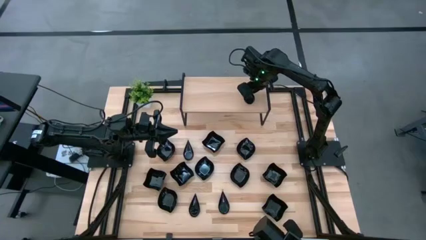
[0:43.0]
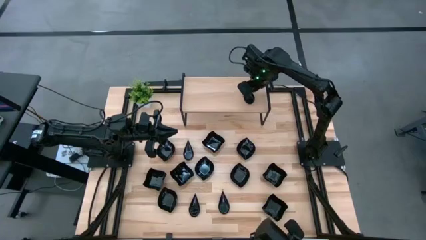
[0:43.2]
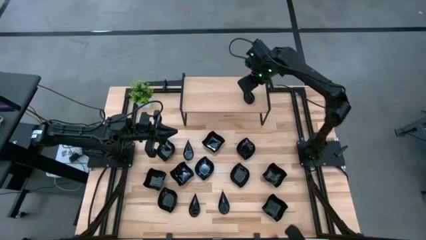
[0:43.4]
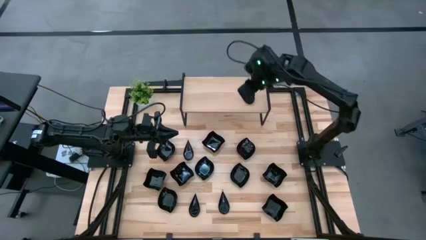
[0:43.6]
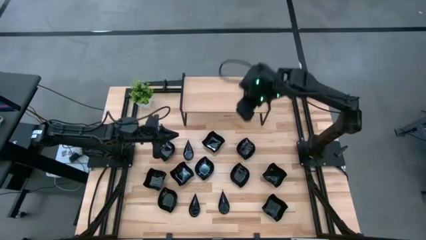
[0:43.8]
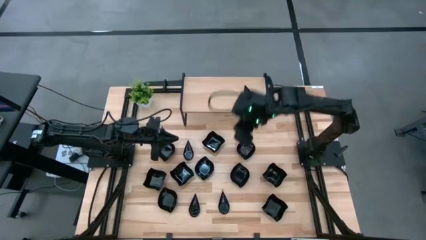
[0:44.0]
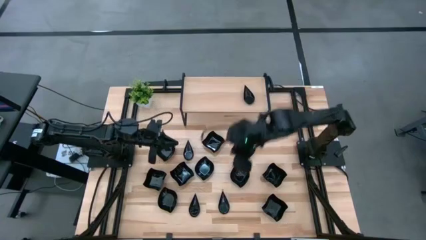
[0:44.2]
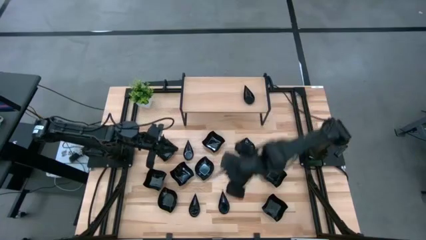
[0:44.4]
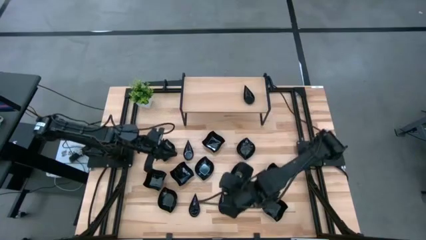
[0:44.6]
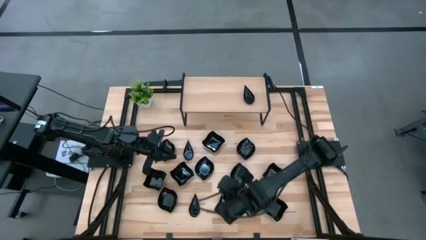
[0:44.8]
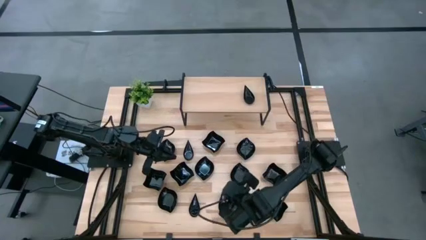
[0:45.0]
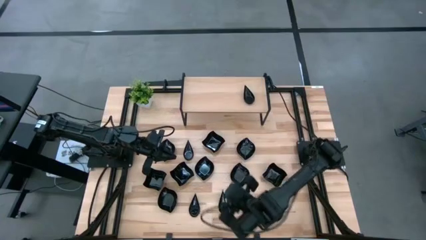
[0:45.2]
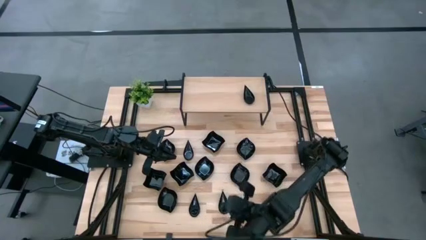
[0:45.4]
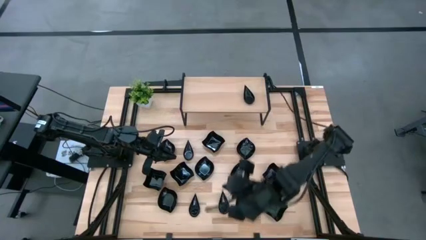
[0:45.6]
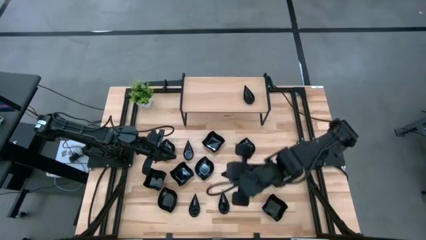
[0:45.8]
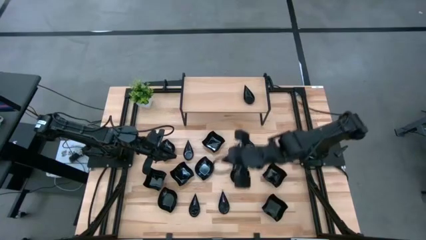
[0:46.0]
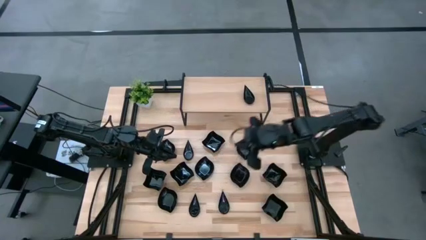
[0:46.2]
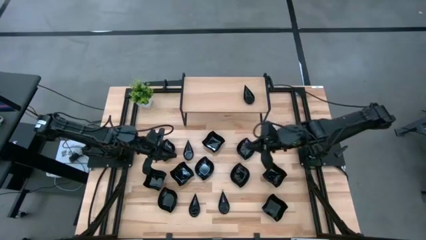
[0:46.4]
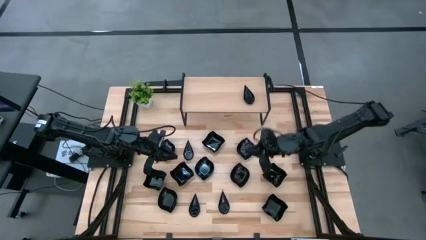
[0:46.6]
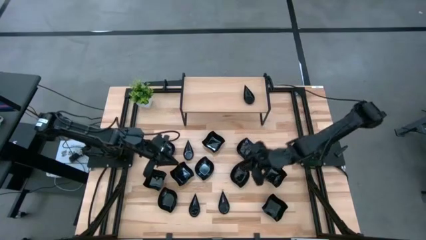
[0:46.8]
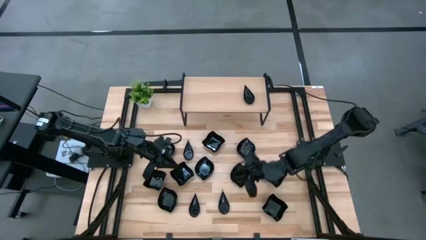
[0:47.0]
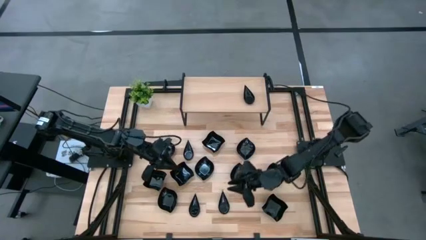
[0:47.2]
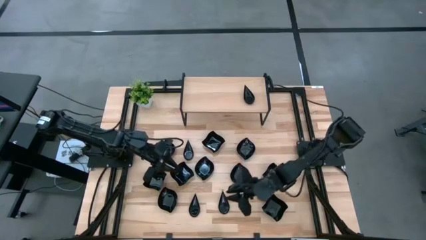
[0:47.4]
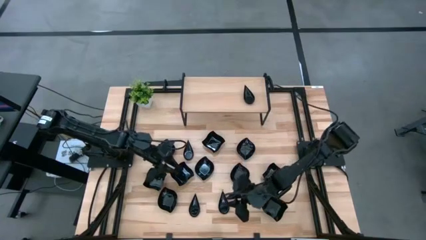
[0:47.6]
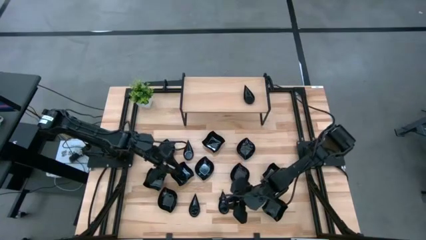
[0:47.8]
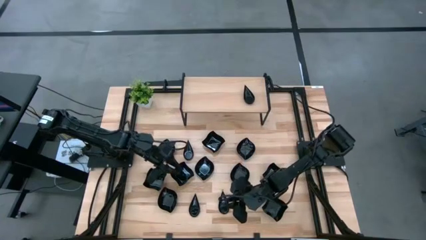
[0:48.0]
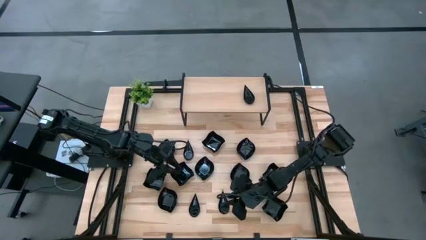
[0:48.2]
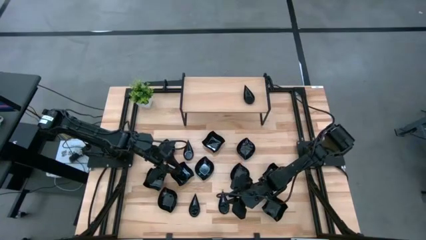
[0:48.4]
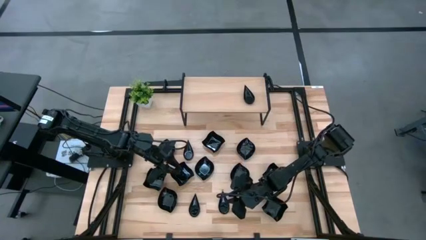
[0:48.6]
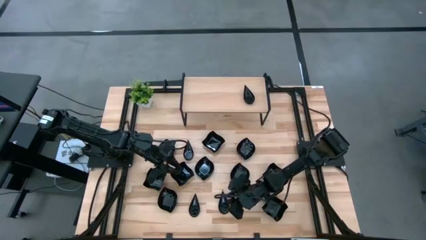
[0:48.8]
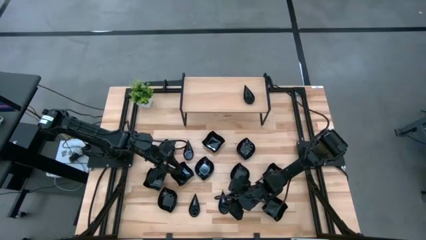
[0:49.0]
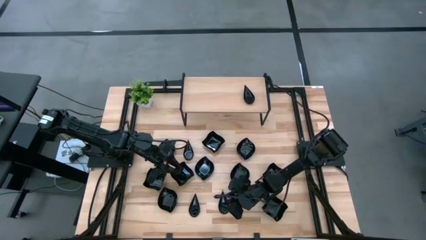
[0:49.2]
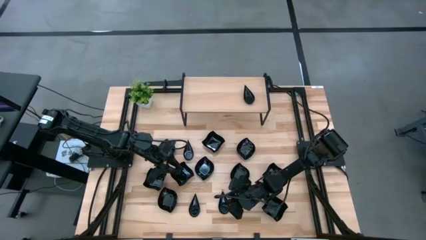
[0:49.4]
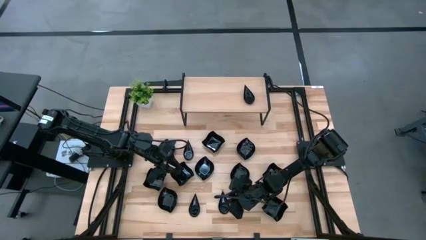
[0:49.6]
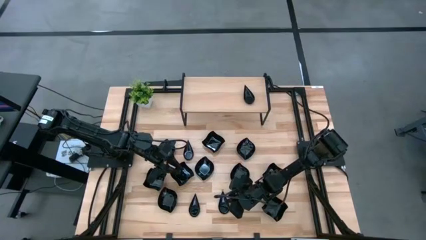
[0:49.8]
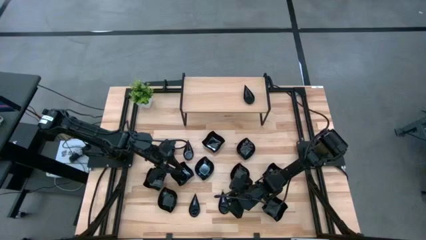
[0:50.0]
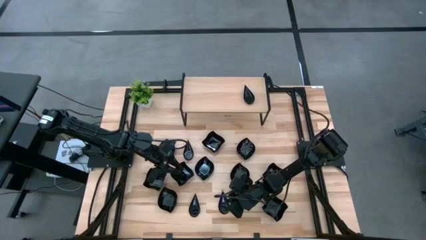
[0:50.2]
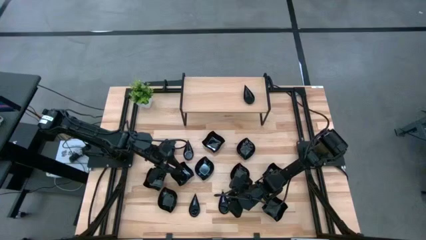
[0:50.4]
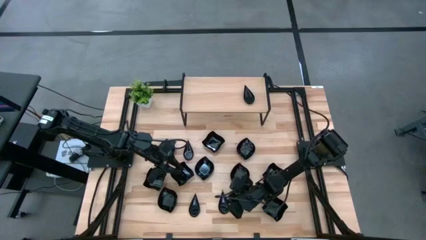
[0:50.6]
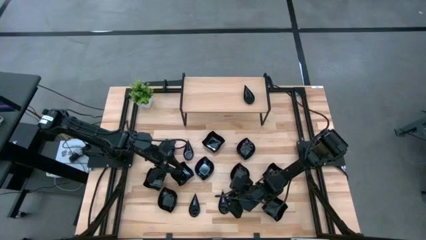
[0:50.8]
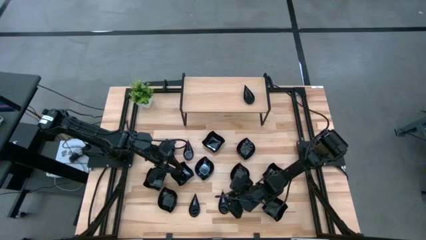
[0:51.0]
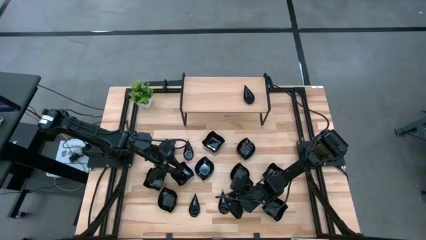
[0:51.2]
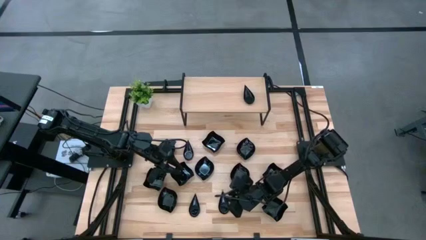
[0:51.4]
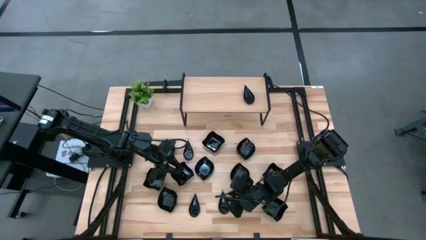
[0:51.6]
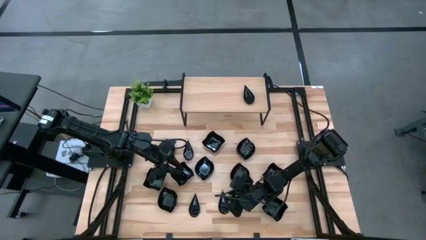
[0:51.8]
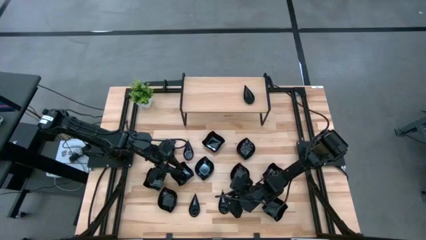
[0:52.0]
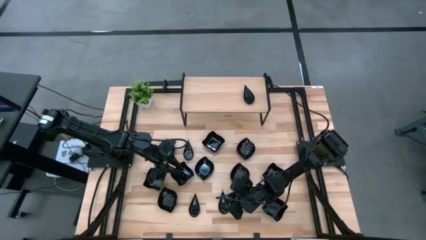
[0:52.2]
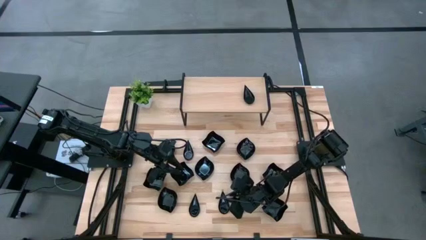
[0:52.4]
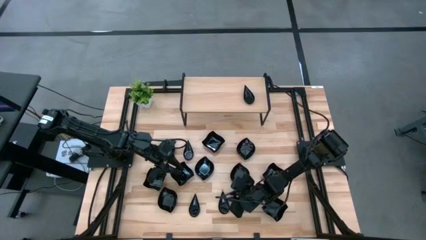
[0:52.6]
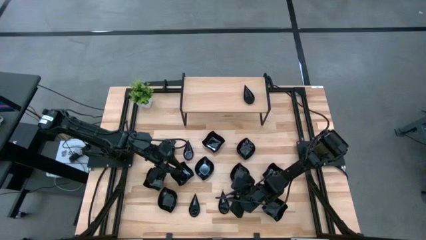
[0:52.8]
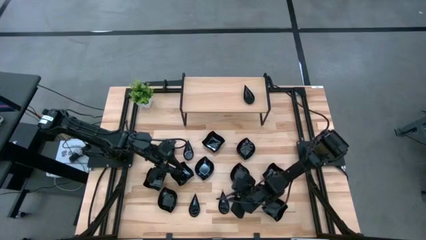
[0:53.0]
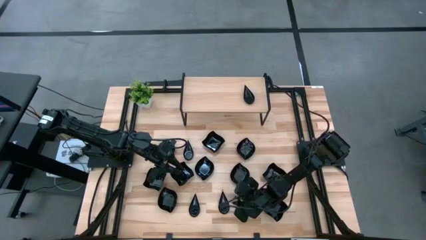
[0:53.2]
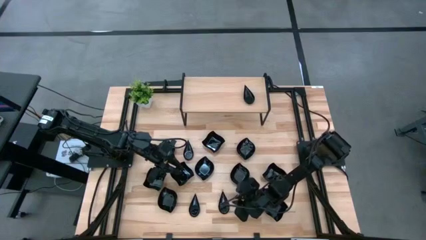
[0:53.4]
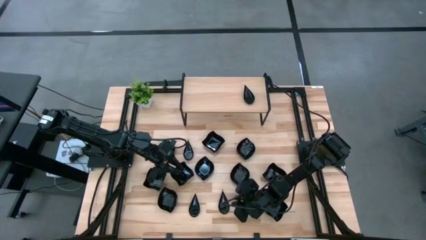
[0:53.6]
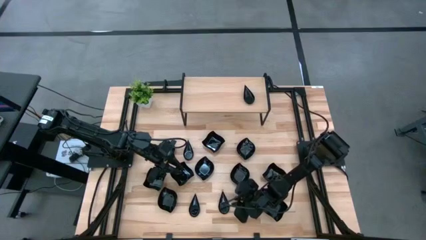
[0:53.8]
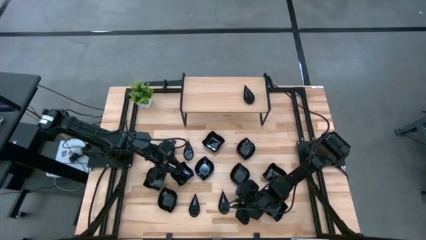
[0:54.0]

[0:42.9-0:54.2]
Task: Pick & Place Mini shaped plates
Stack the black drop shaped plate on top of the black drop shaped plate on the shelf
